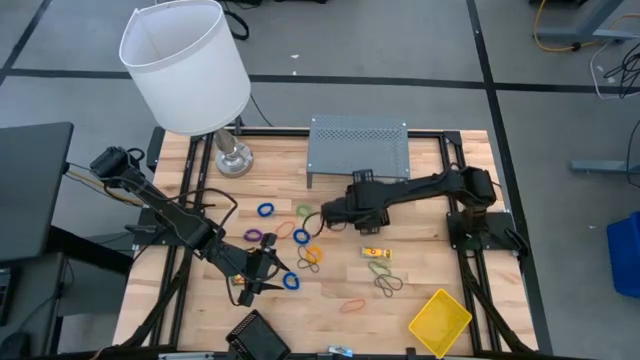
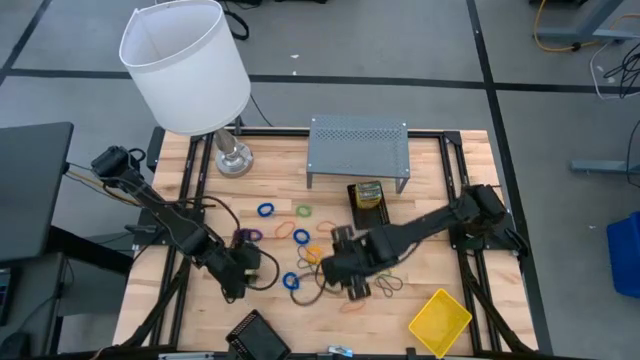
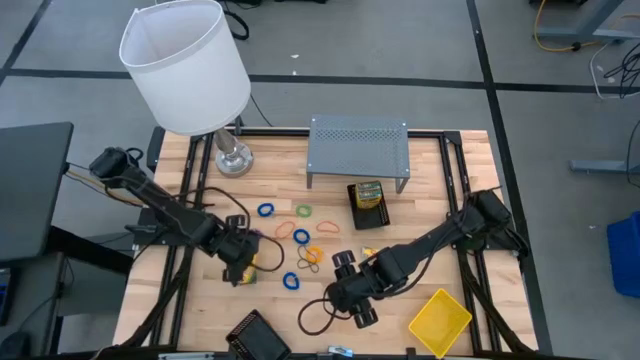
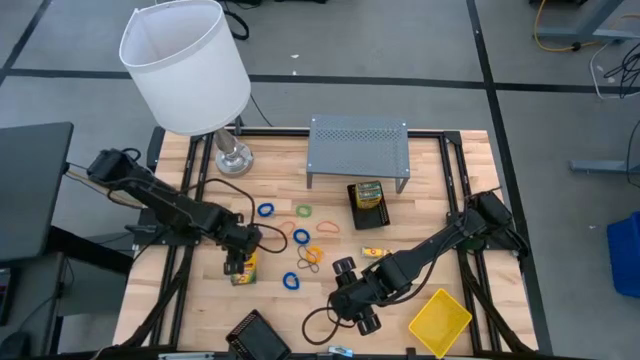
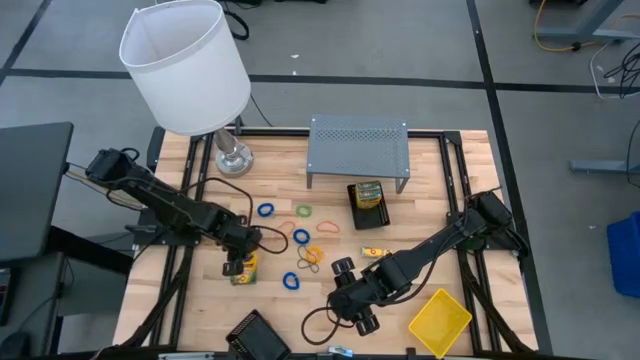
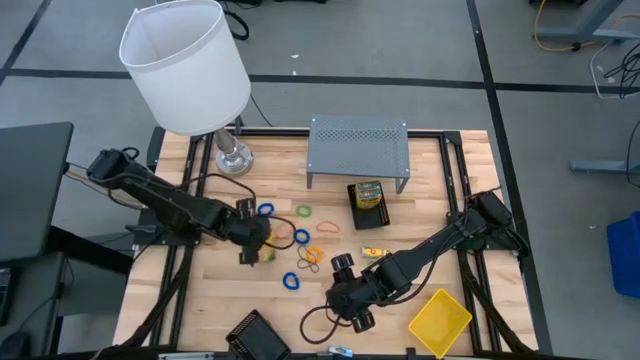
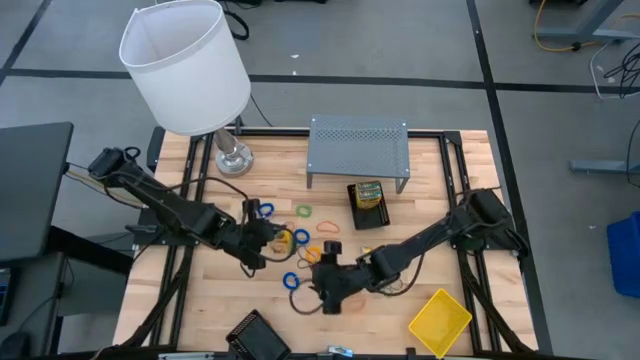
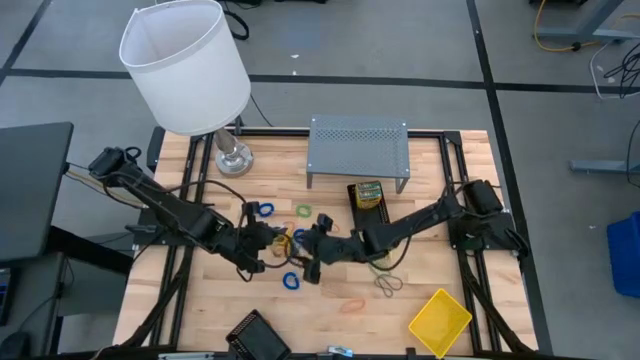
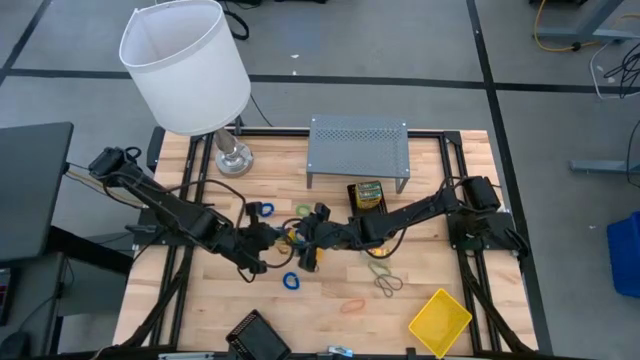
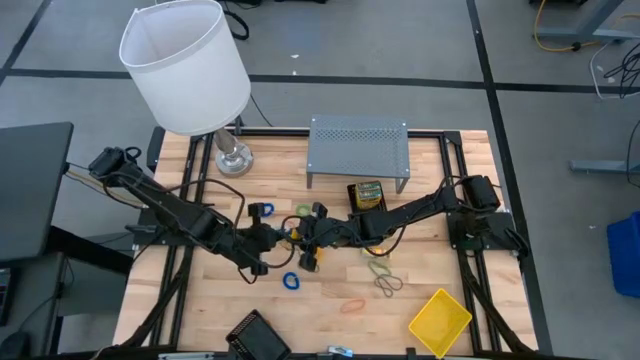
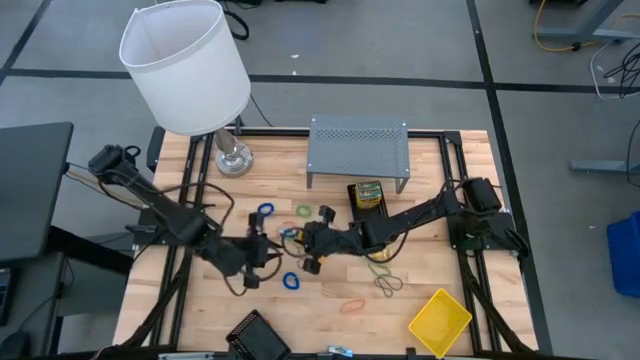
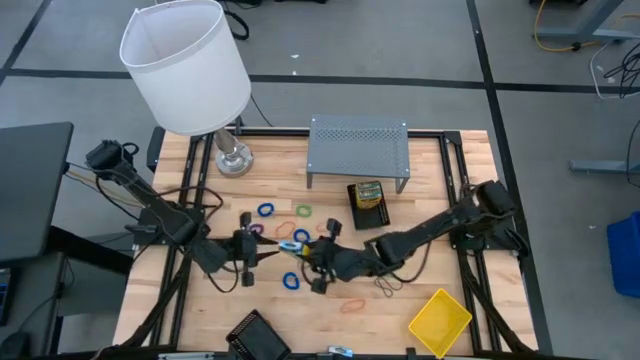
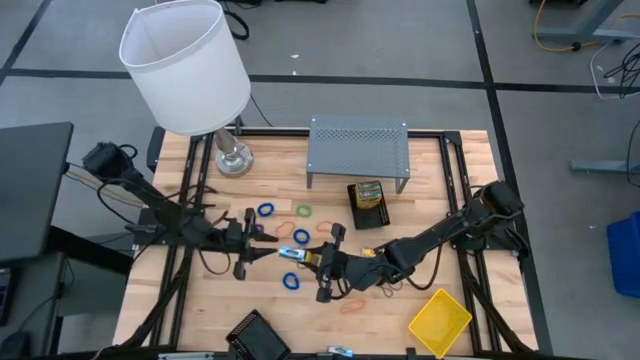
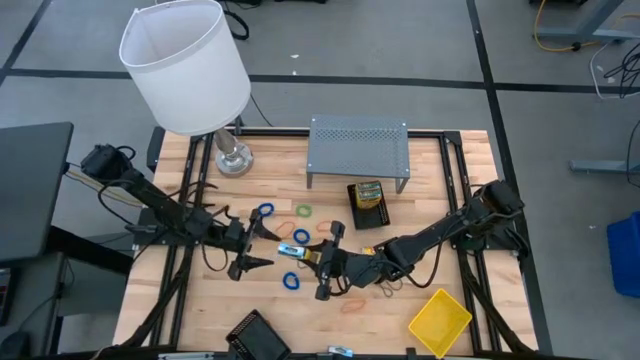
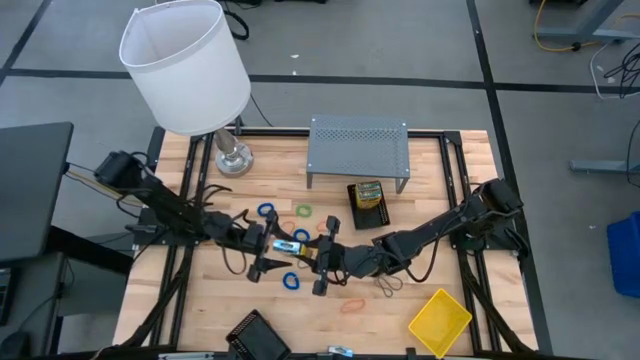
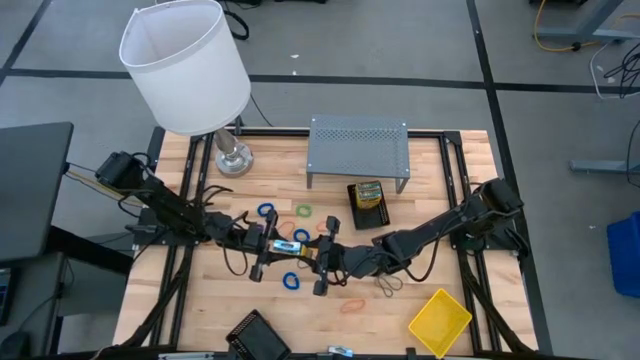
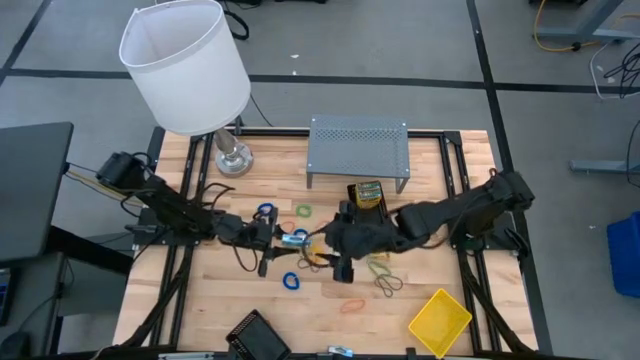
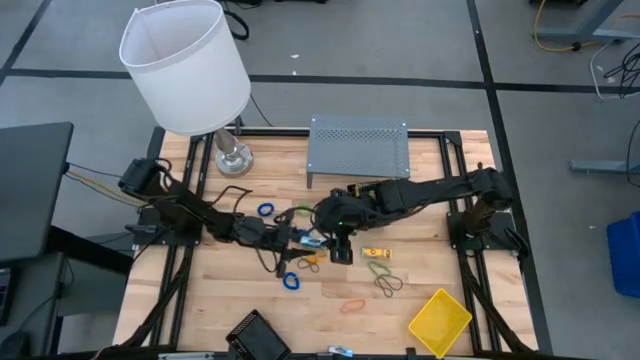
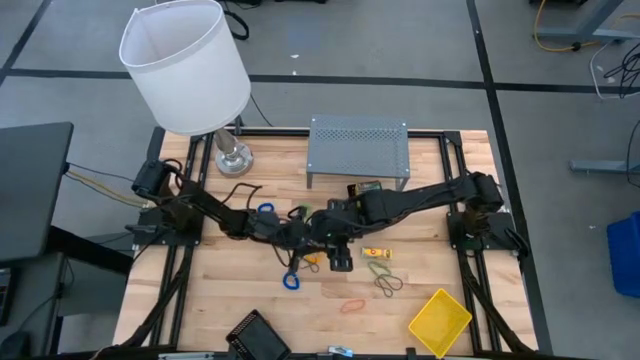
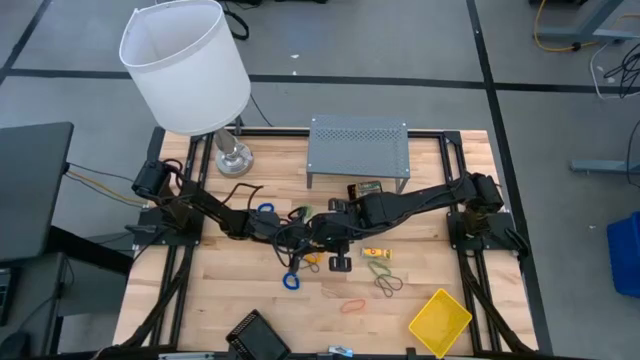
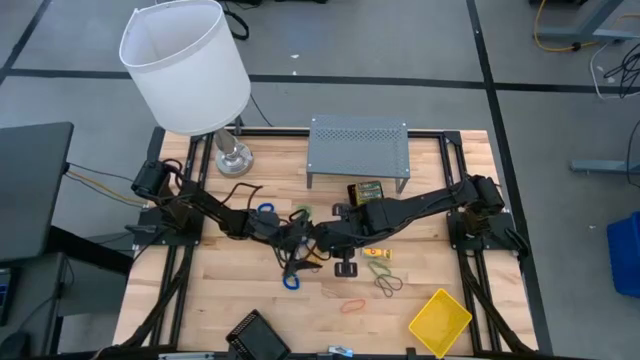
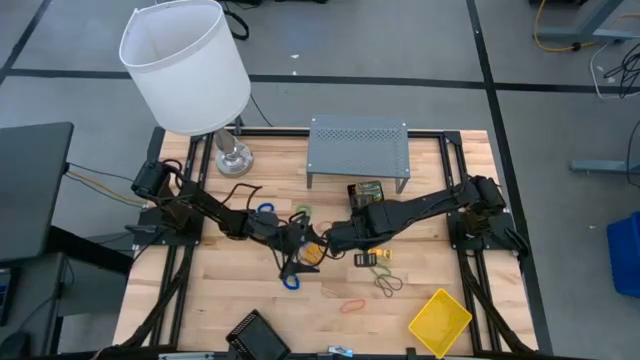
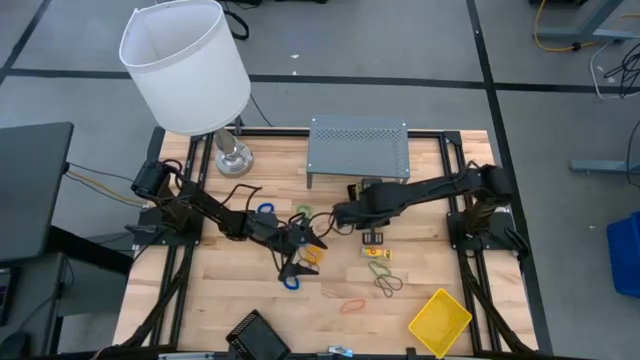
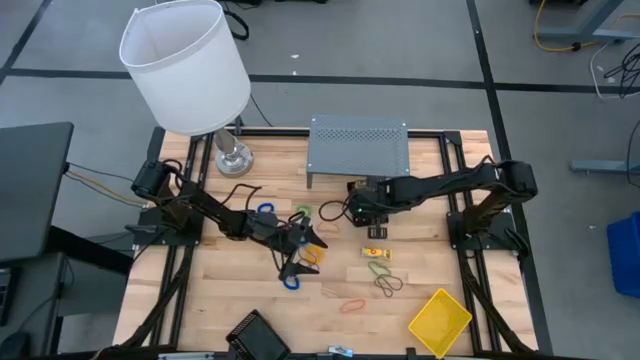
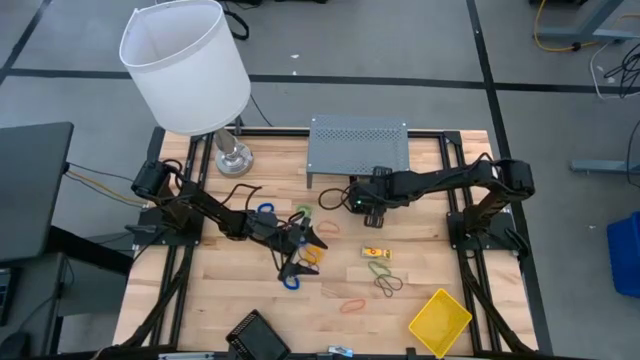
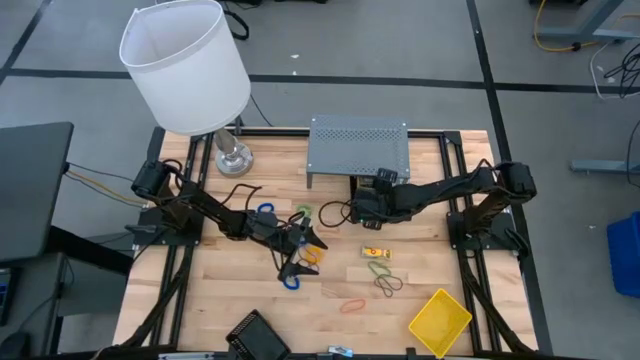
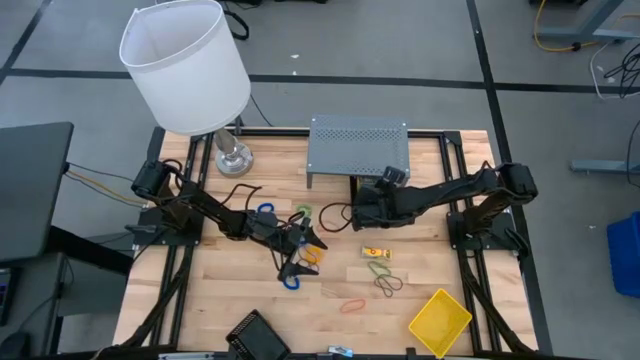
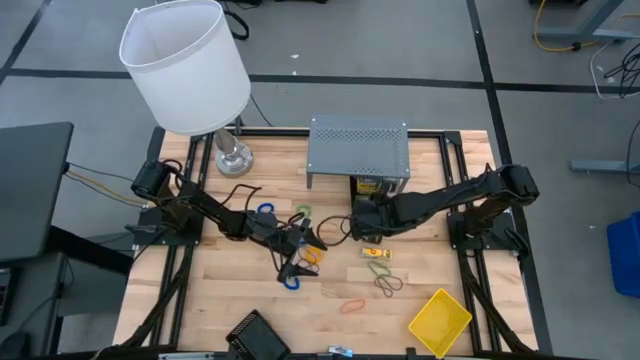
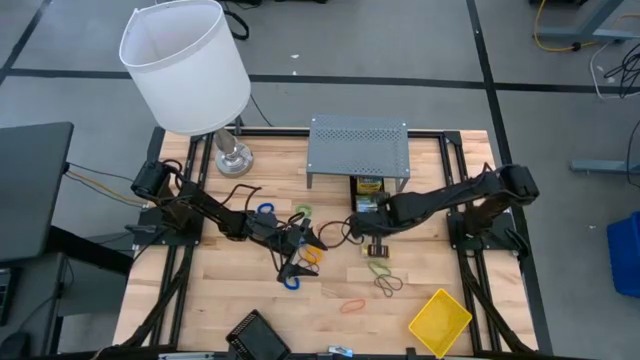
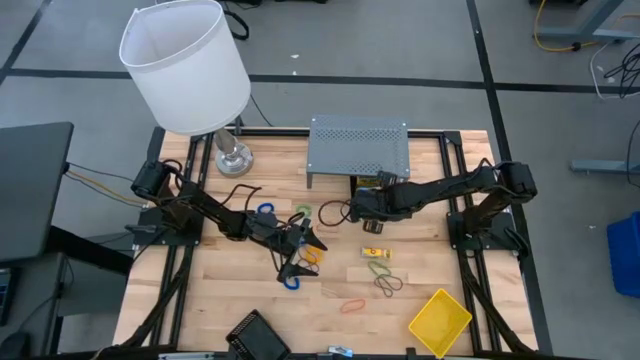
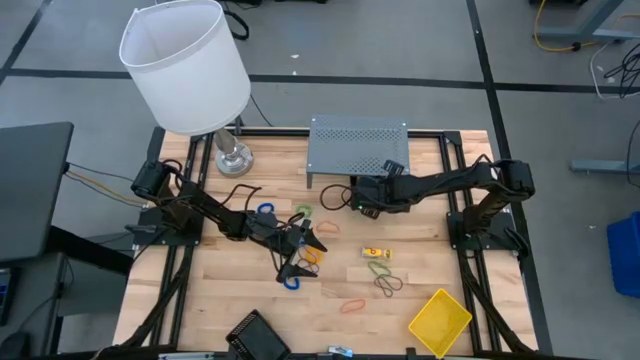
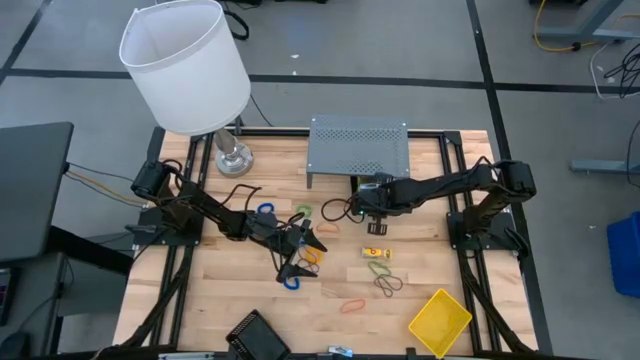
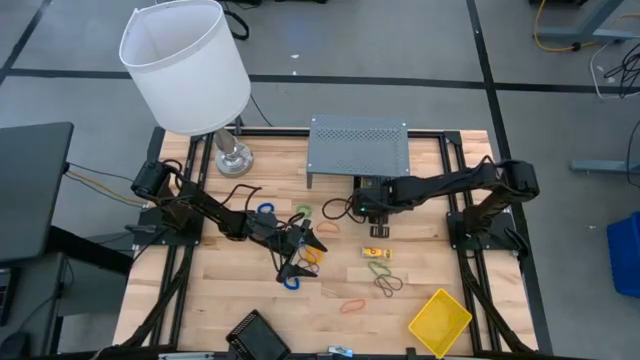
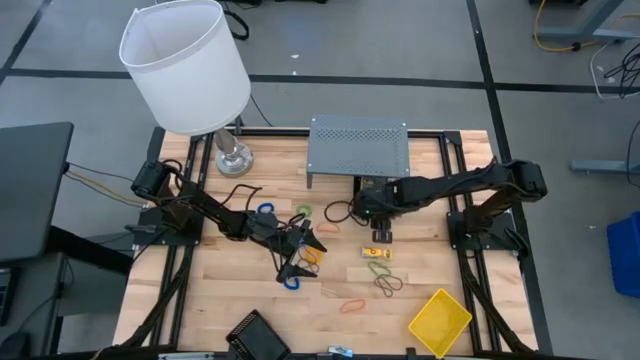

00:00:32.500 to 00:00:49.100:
Task: Pick & Place Office Desk Supplies
Put the yellow crayon box into the top black bin

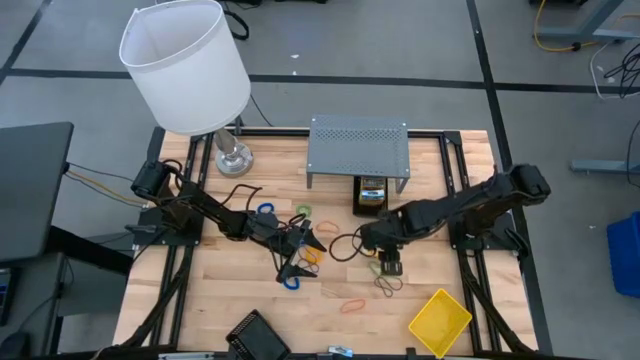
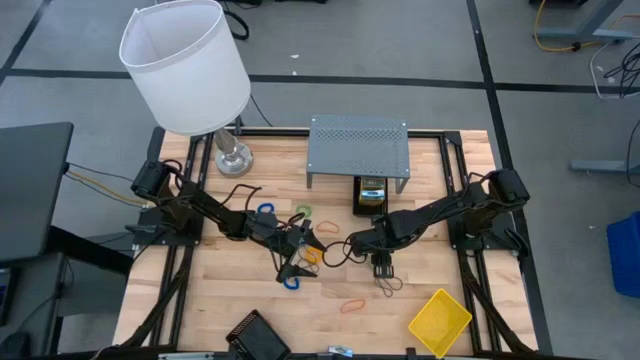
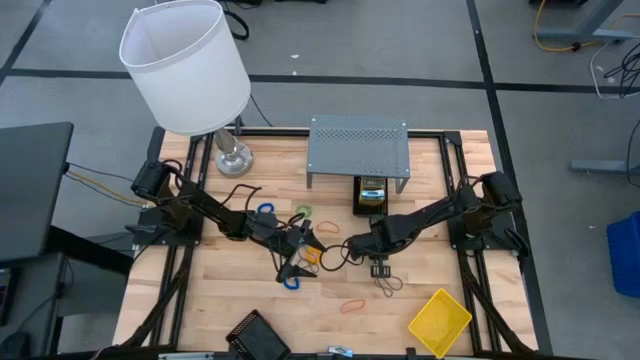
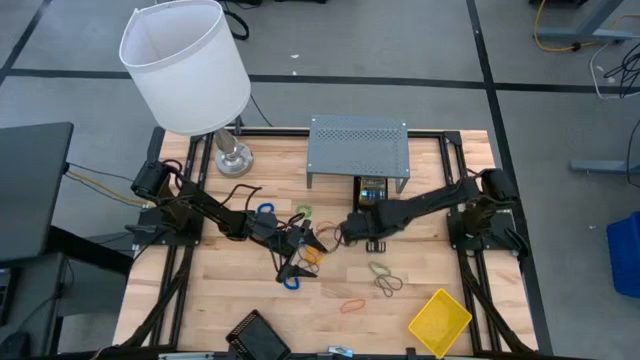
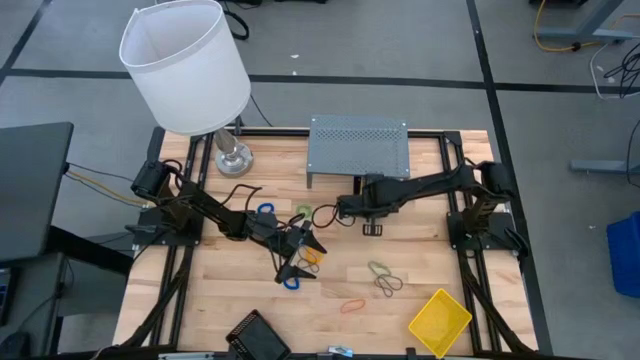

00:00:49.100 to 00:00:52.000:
Put the yellow crayon box into the top black bin

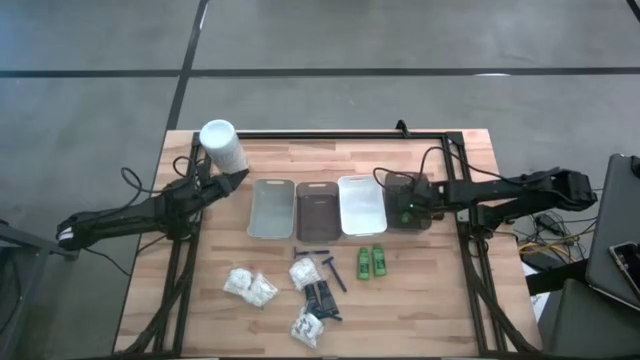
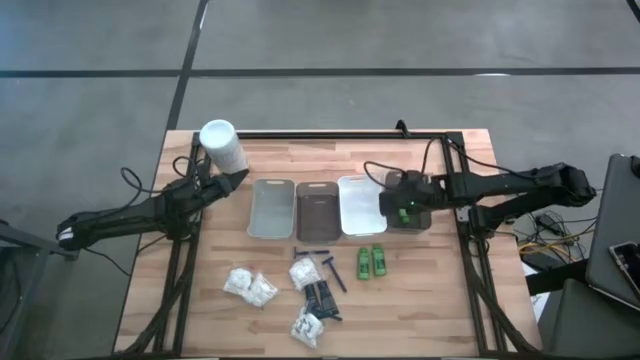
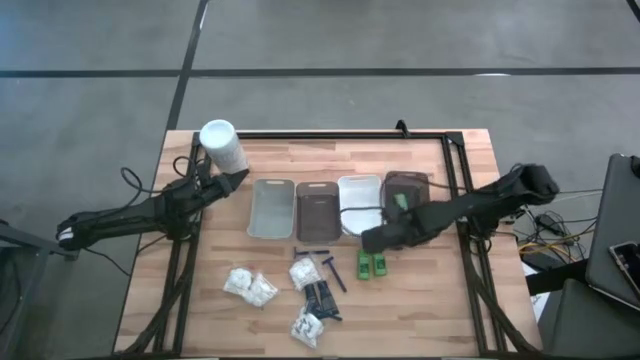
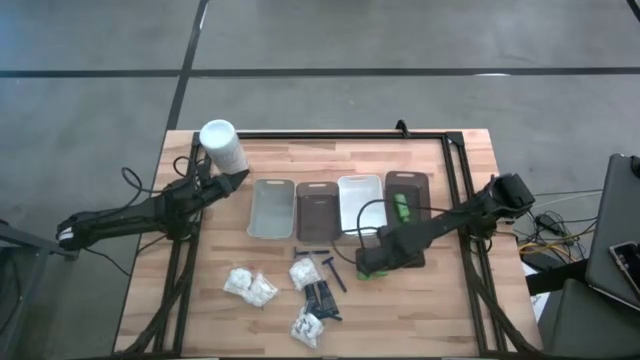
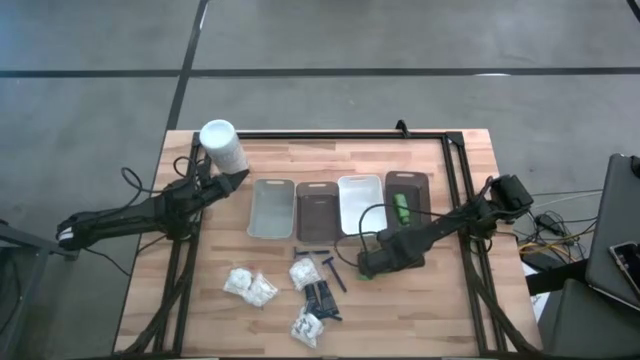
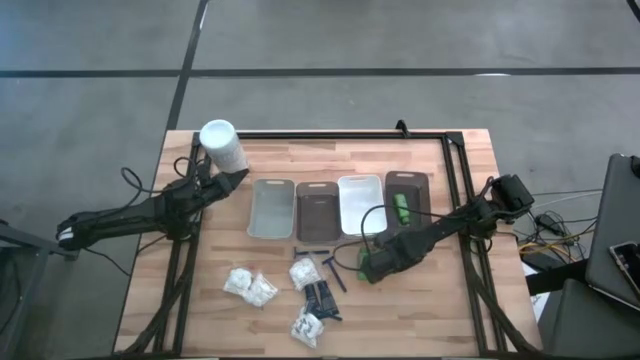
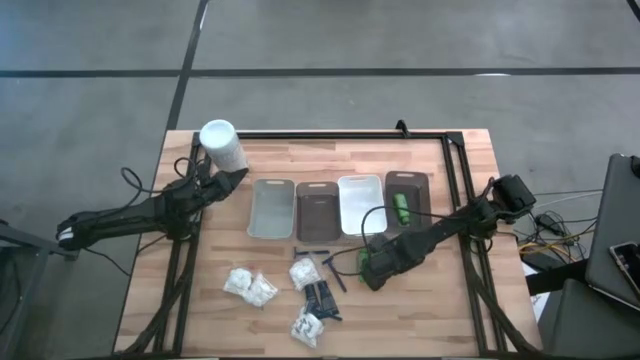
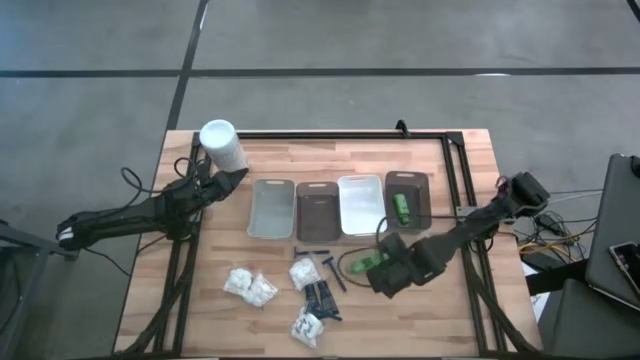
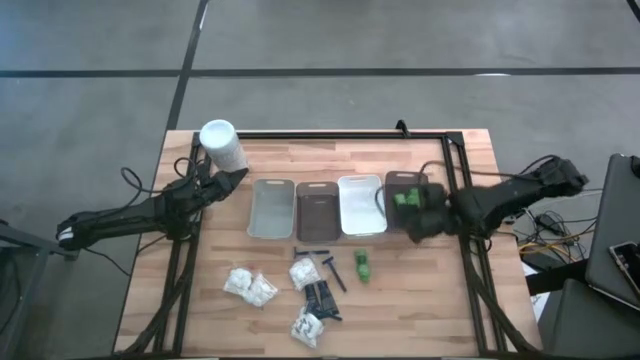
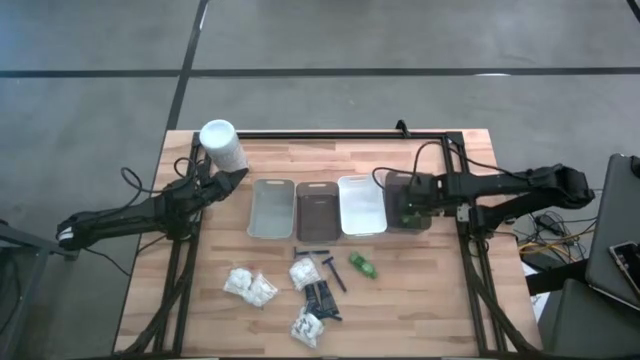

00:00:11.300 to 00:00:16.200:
Task: Pick & Place Travel size toiletries
Put the green shampoo bottle into the right black bin
